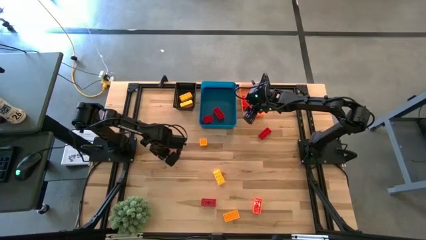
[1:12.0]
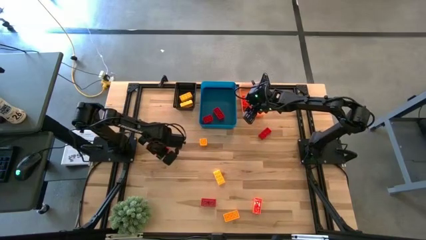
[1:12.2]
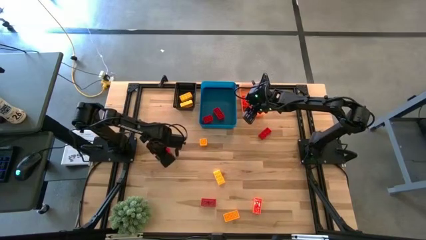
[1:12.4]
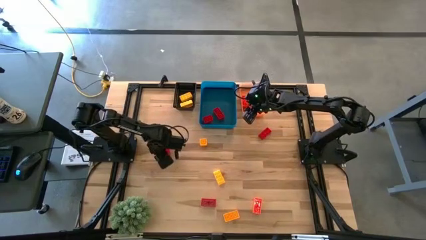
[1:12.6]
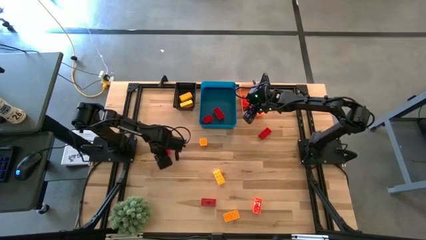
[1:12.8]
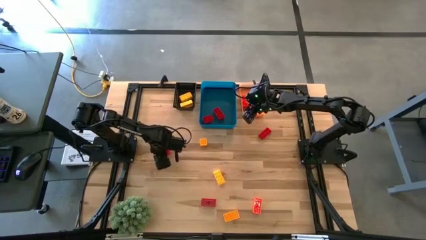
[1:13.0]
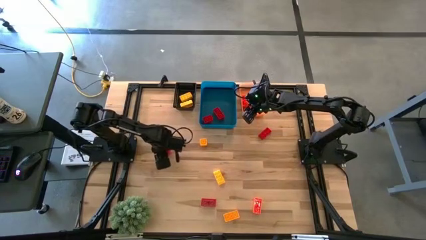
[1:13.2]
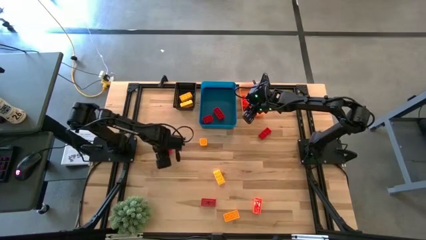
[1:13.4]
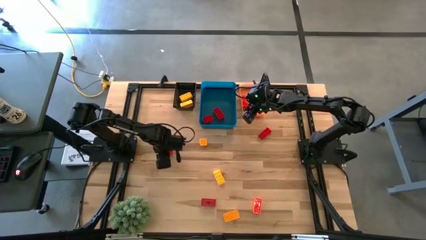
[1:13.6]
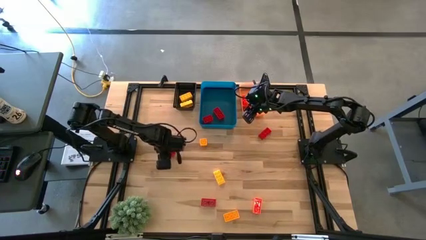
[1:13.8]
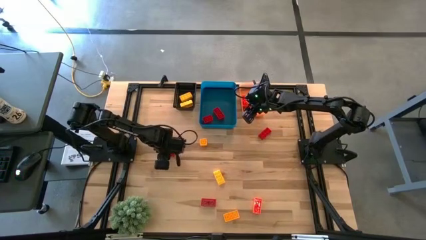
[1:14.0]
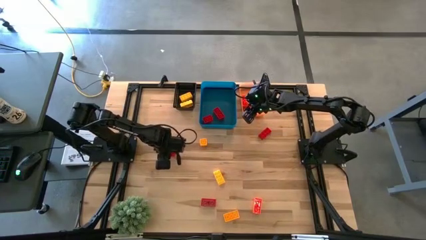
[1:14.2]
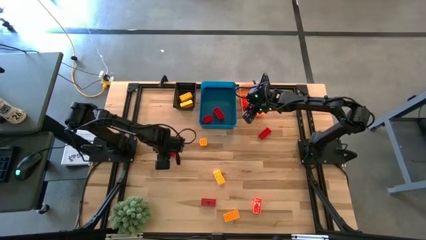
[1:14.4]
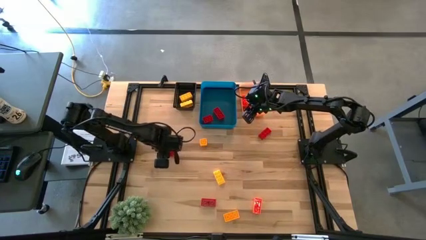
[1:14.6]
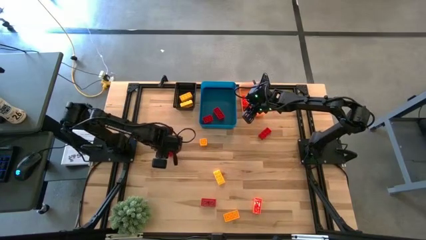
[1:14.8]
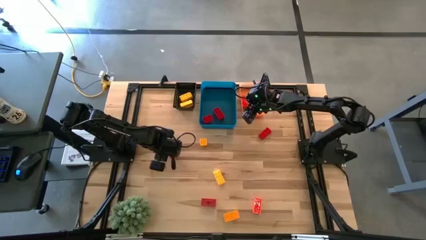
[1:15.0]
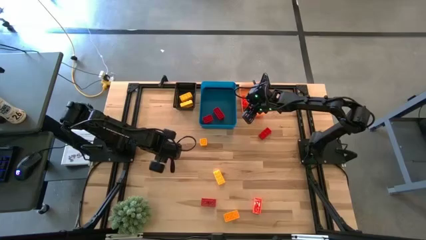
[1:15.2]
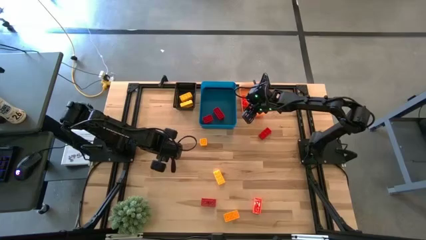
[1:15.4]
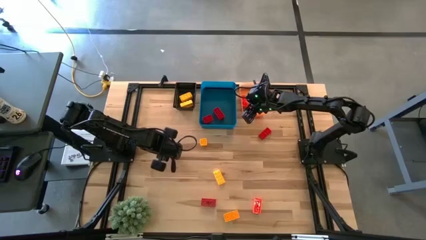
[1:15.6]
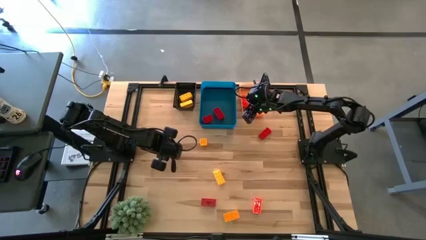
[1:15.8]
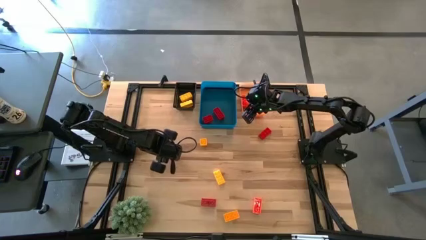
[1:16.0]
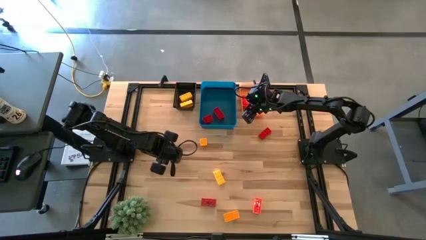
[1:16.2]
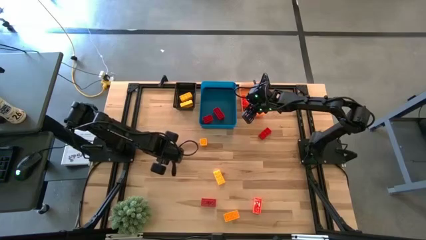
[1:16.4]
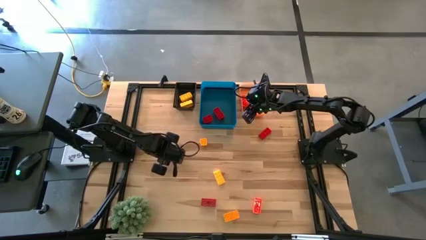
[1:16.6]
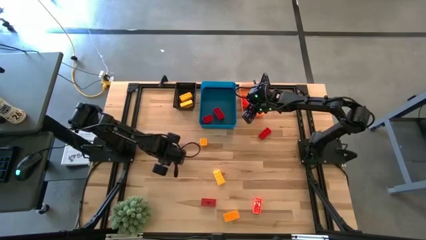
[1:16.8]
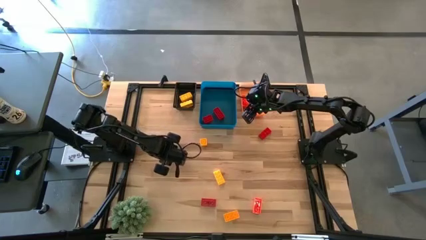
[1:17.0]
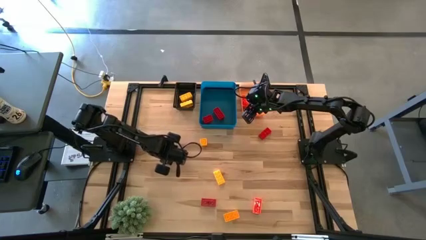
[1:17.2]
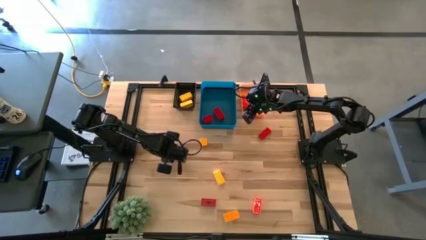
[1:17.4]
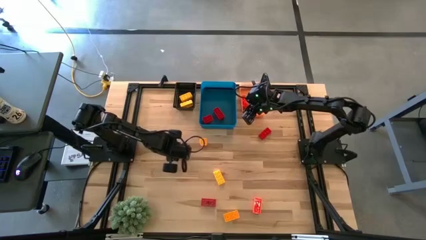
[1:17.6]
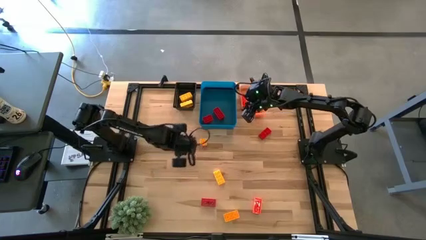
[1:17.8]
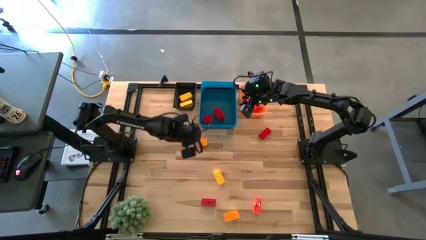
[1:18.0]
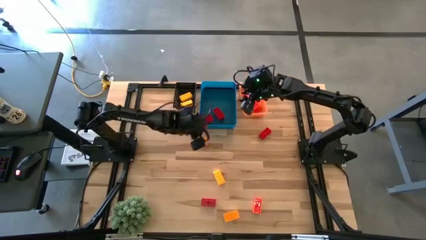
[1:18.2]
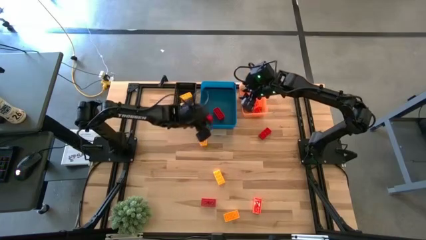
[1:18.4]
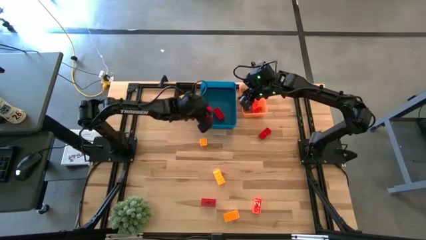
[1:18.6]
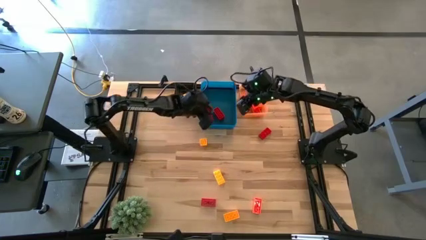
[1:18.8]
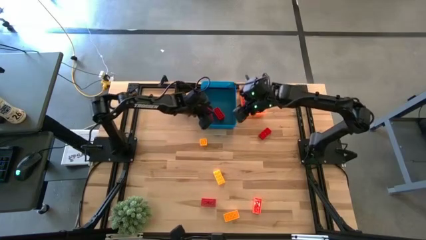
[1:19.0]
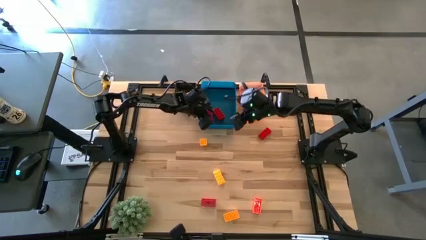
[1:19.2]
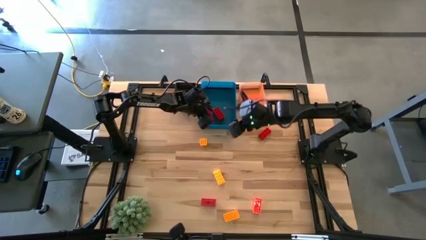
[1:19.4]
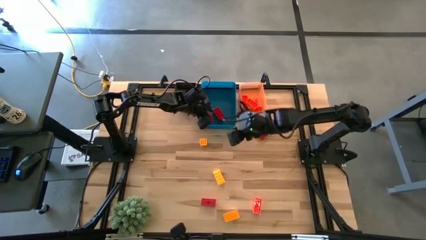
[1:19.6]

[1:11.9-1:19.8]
Task: Sort & place blocks by color
Put the red game piece into the blue bin

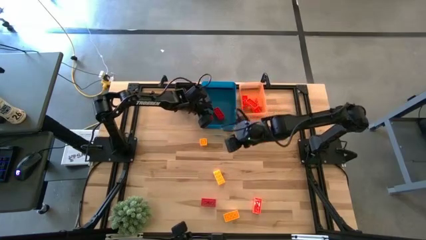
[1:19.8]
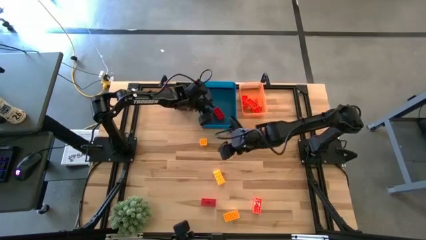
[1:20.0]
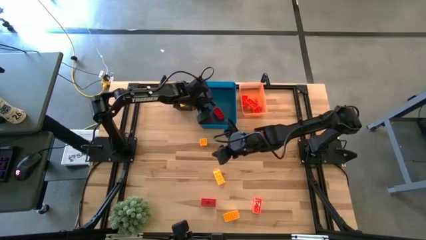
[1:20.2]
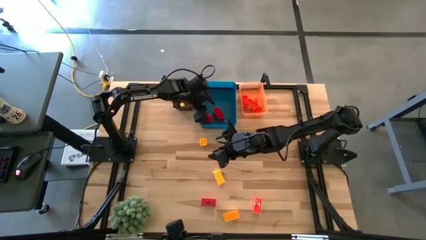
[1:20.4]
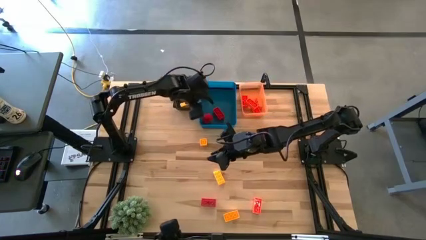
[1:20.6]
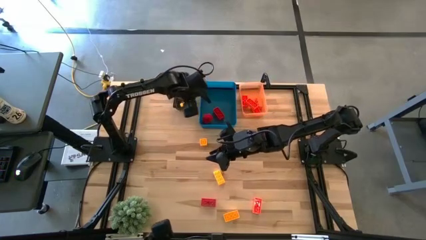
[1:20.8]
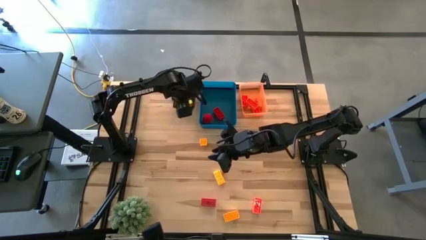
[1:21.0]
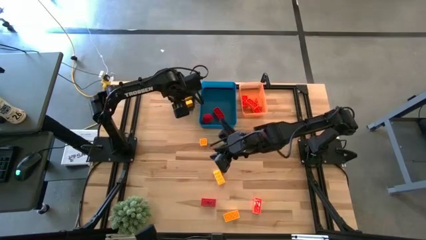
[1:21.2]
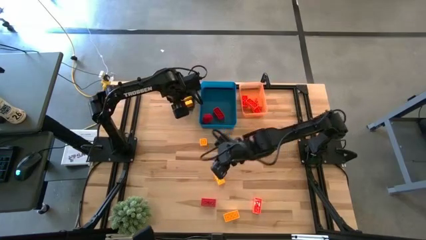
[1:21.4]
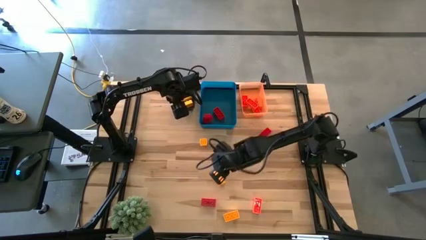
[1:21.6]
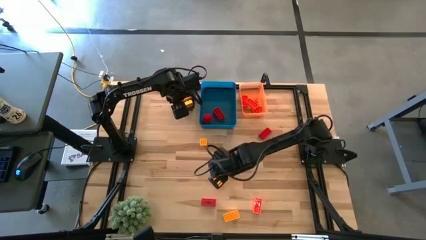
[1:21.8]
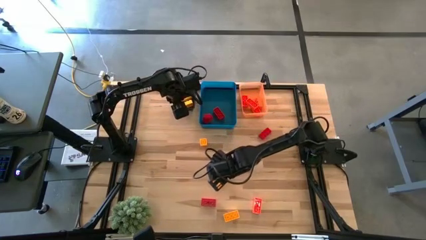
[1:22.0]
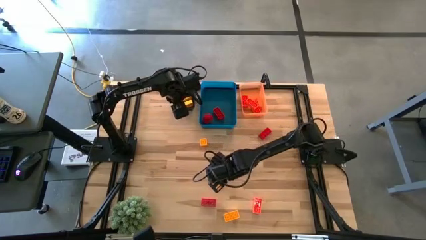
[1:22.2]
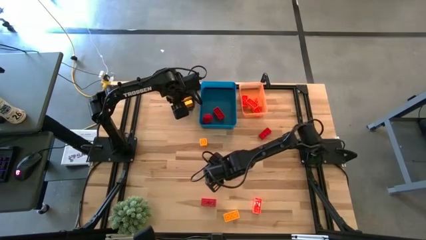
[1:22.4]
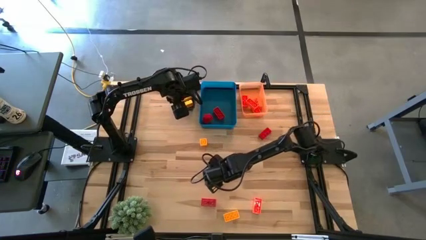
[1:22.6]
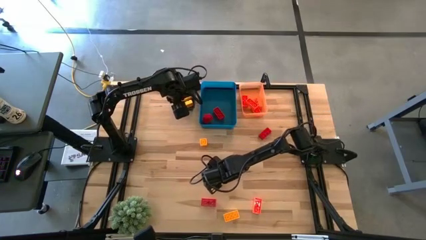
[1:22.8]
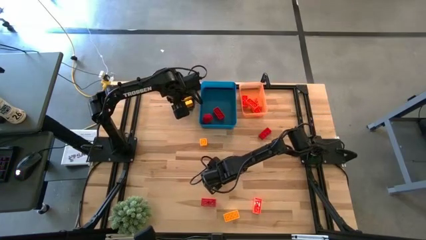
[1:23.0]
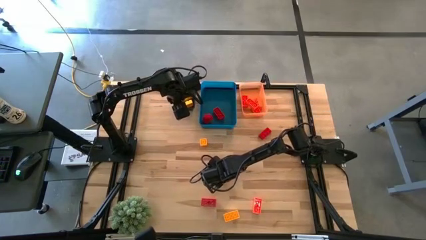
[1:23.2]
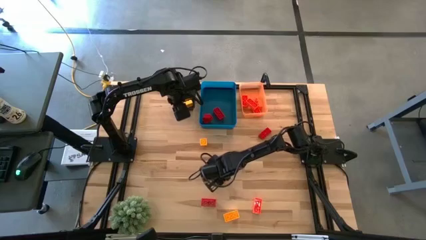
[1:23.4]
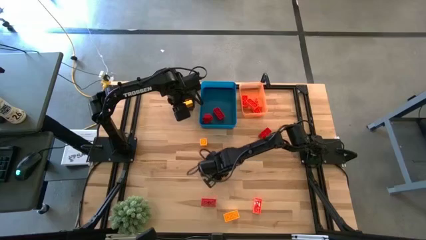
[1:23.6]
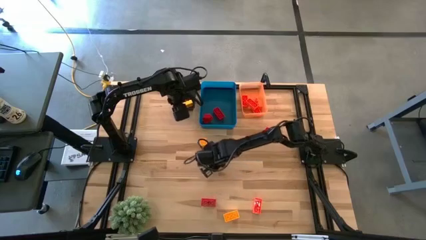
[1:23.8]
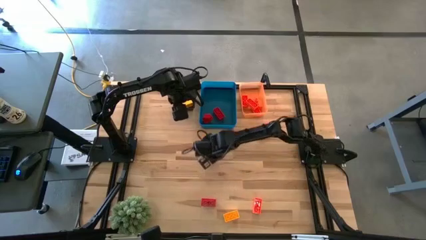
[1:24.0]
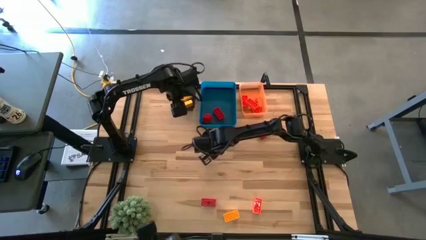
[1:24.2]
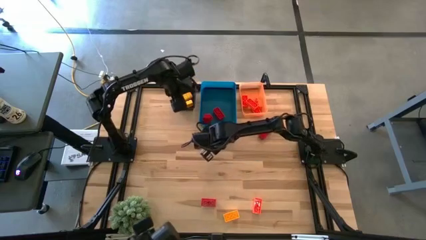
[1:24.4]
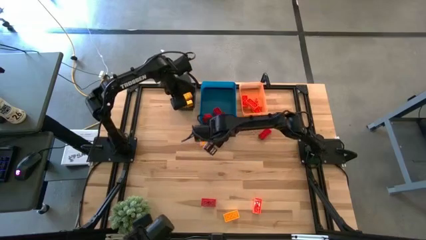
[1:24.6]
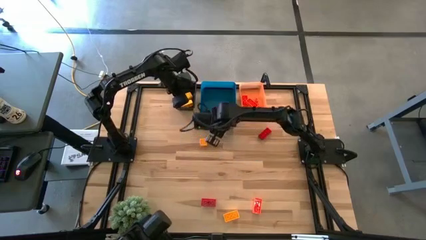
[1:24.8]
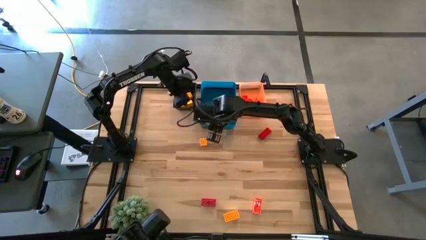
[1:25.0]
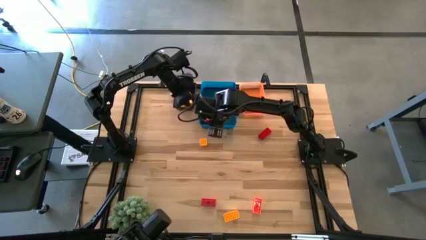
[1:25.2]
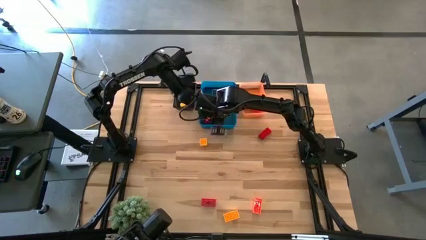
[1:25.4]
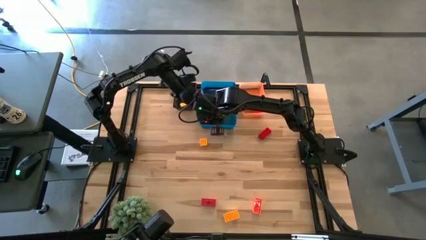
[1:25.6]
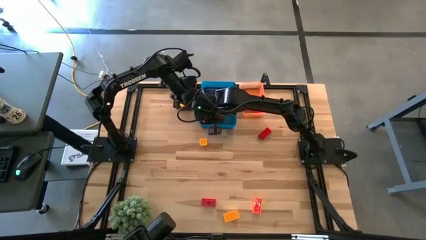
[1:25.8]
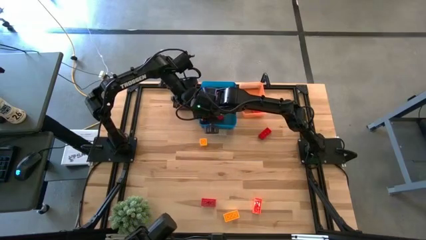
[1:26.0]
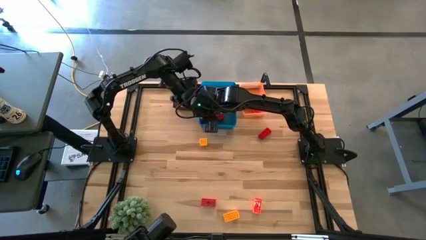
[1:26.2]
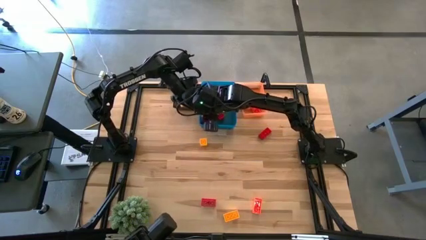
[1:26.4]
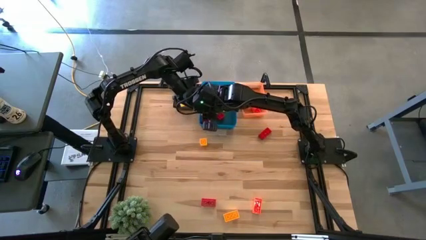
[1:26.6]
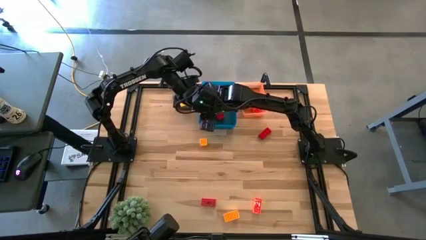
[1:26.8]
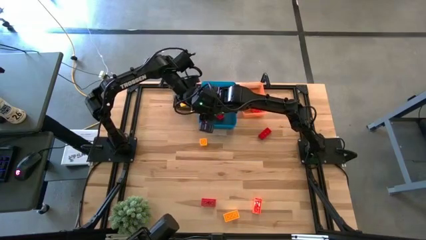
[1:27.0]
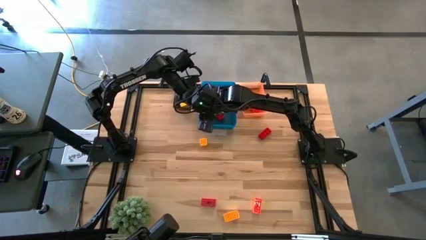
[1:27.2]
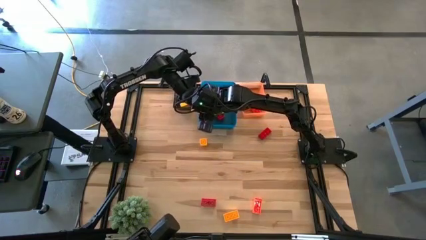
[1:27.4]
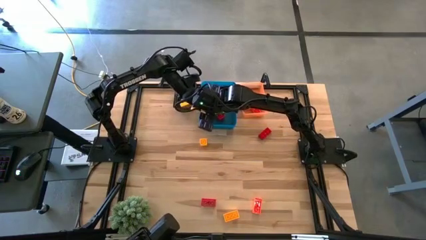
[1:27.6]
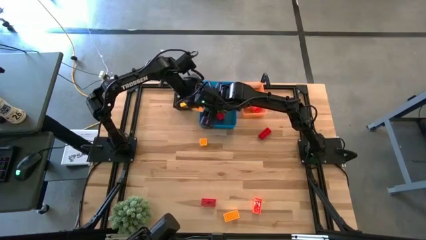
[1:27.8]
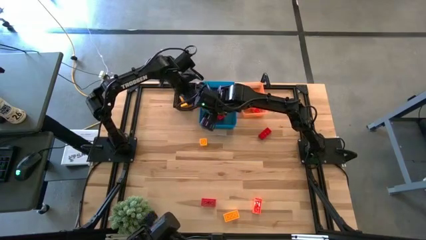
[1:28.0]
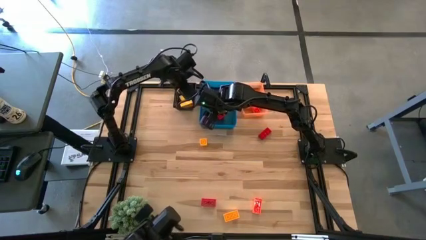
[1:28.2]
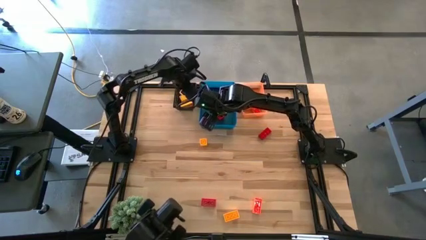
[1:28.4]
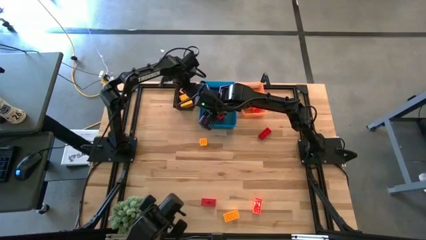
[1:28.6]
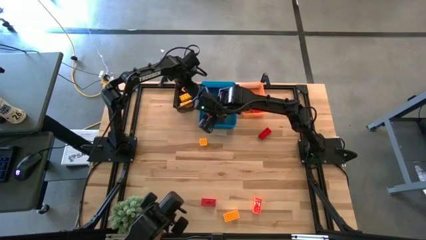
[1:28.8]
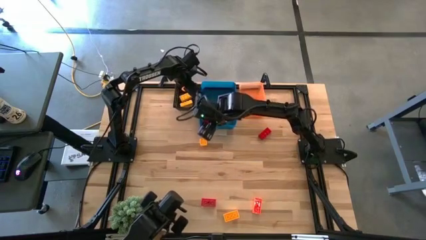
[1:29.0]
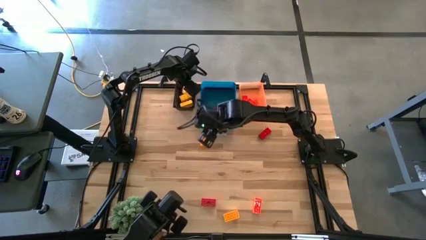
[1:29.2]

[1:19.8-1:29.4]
Put the yellow game piece into the black bin
